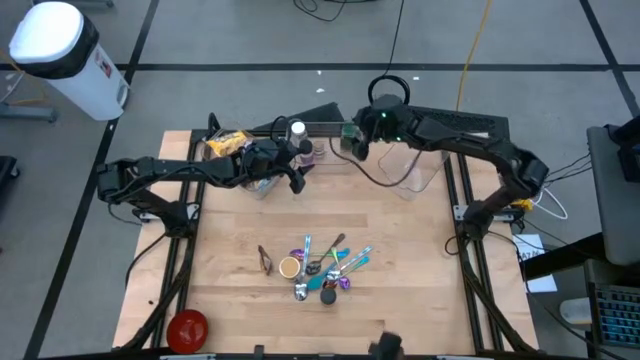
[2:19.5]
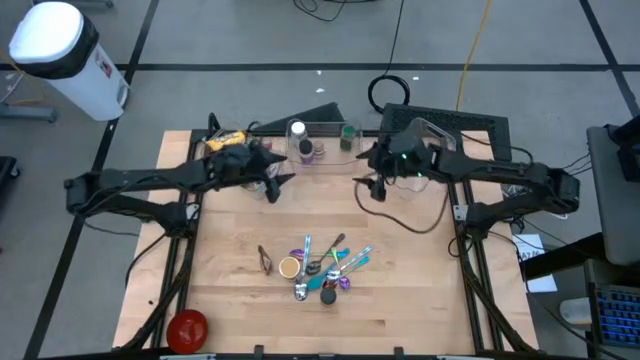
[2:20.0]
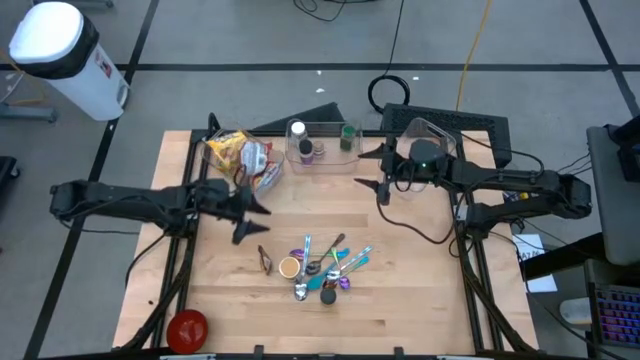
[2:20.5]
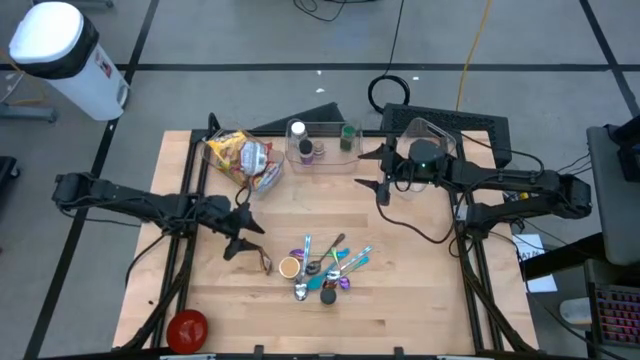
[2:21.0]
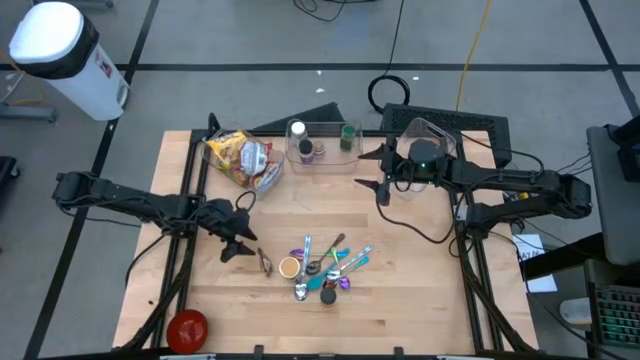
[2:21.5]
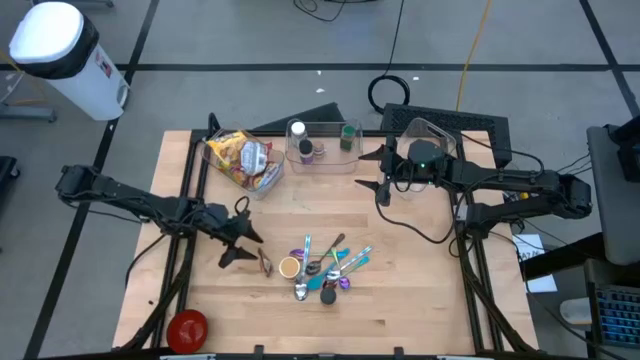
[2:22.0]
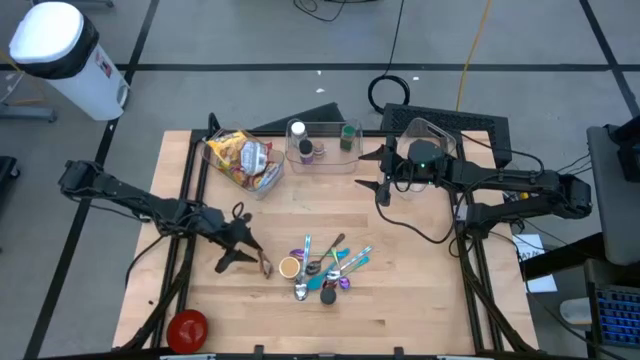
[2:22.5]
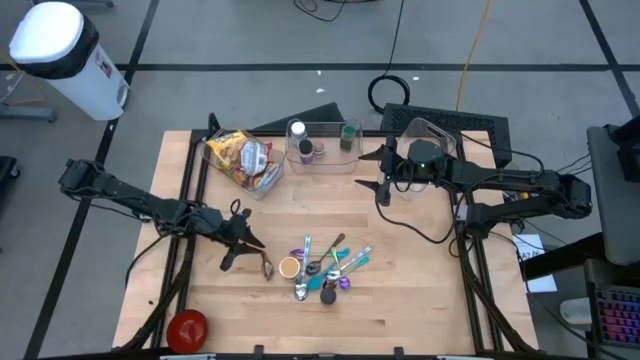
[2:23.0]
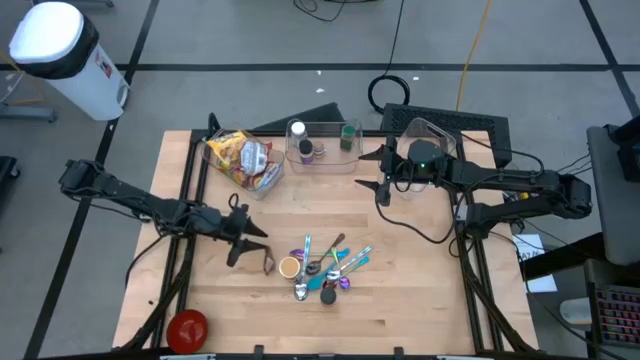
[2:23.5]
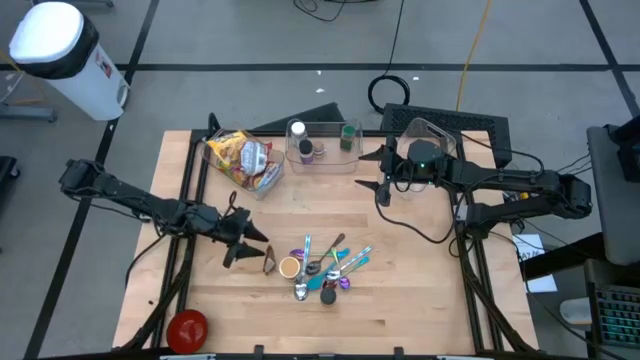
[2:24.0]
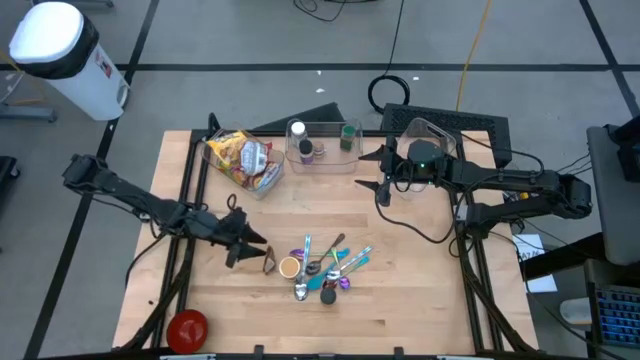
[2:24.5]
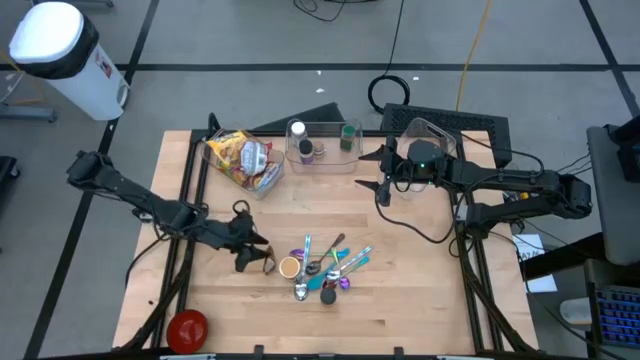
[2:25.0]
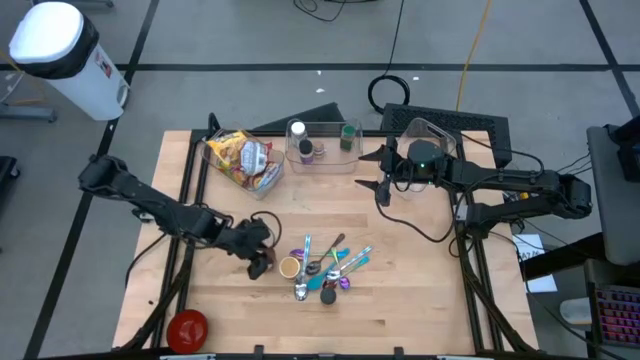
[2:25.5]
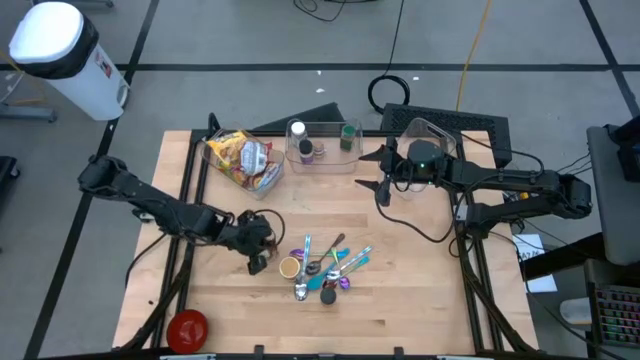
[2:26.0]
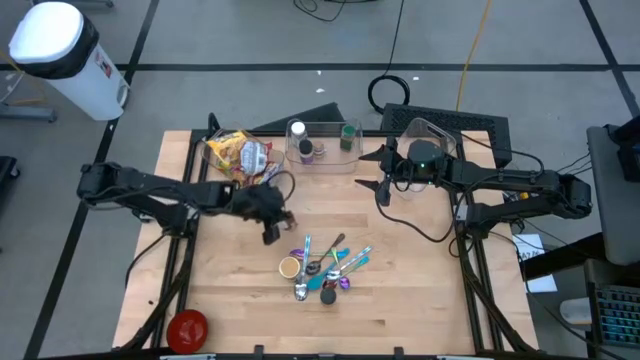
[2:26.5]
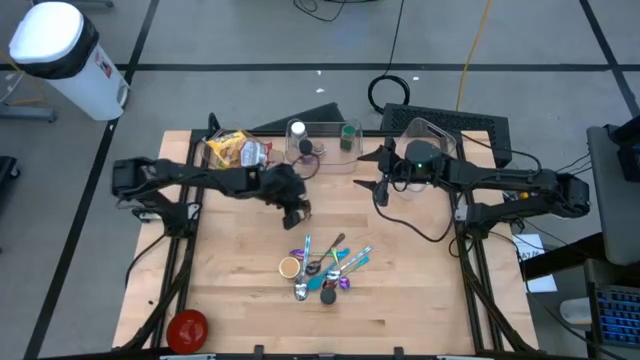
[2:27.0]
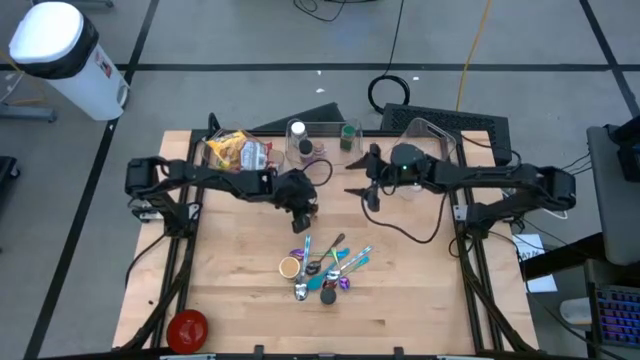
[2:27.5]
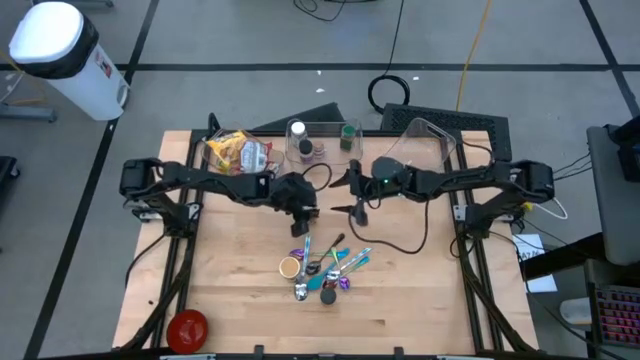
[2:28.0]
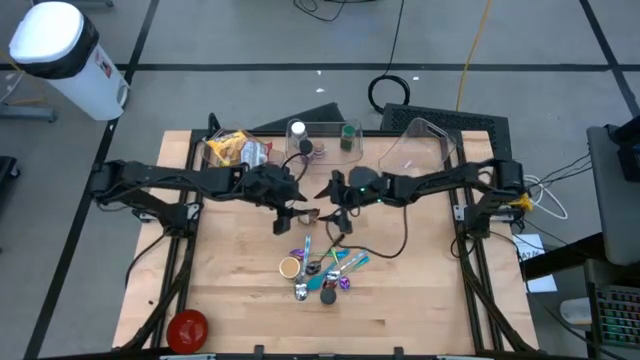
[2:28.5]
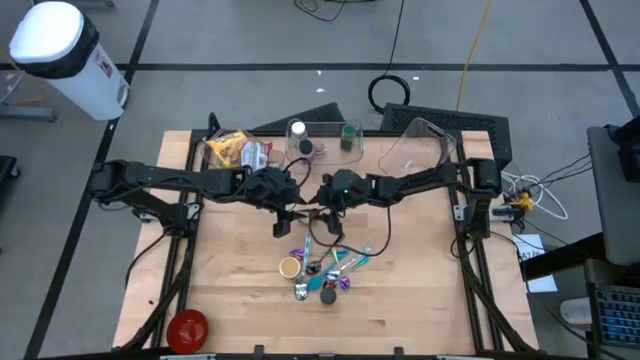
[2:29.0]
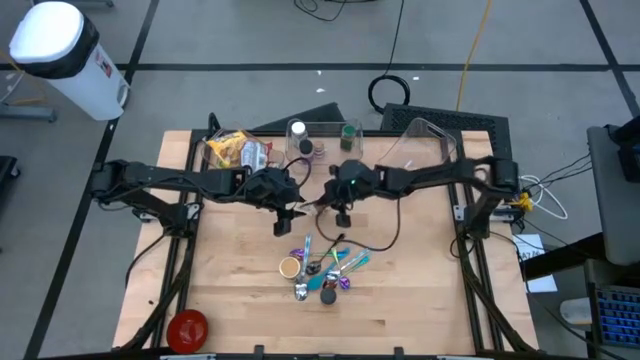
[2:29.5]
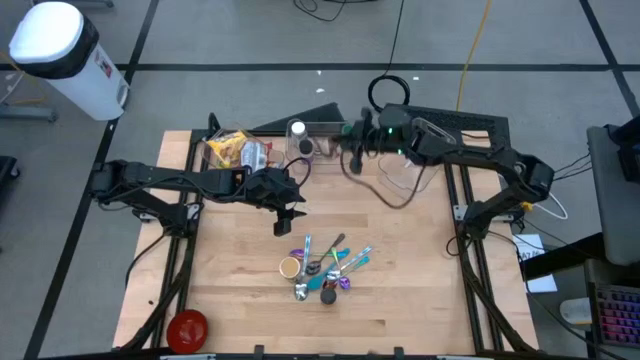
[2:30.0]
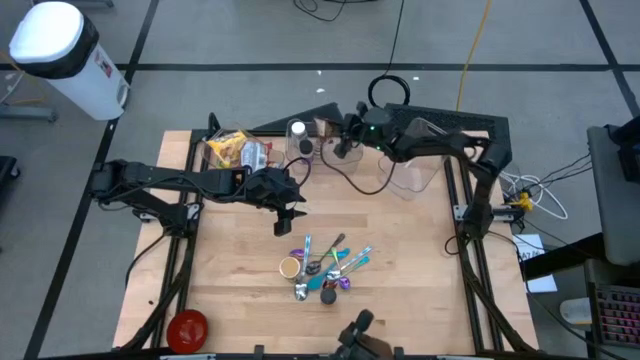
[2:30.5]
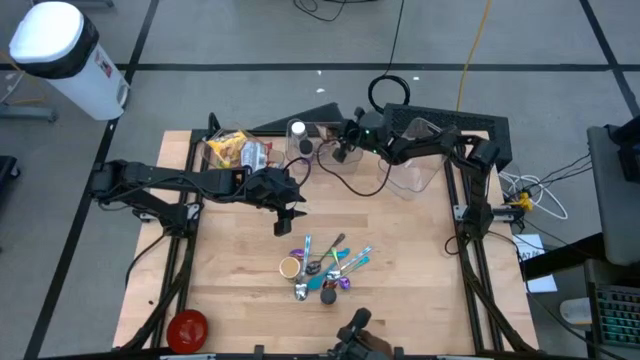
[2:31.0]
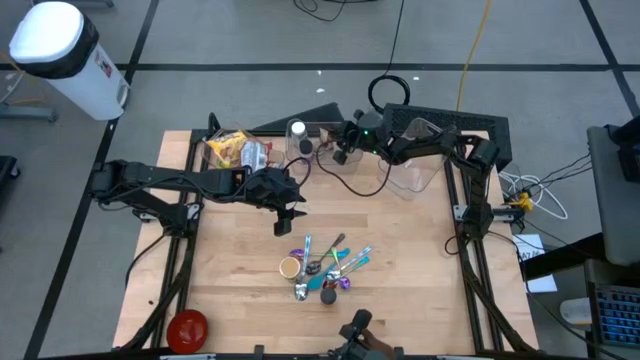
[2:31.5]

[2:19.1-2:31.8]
Task: Pick & Place Food Item
Put the brown orange seasoning pack into the middle transparent bin

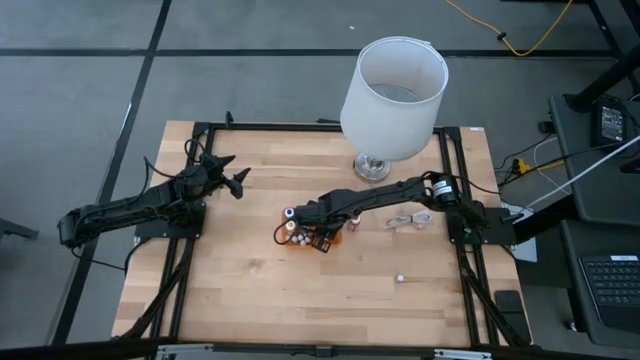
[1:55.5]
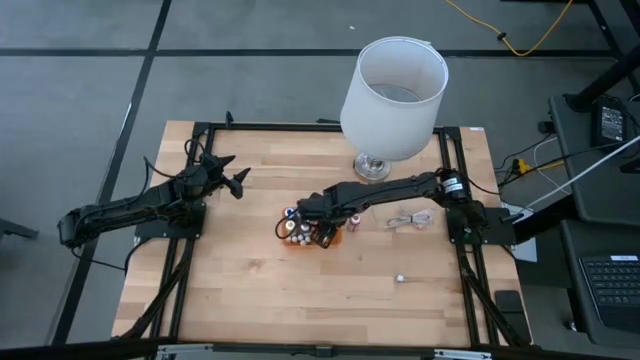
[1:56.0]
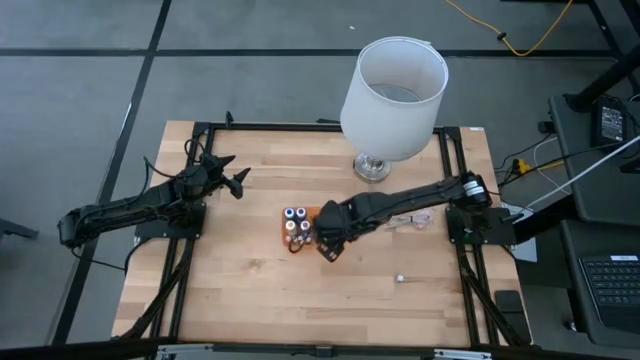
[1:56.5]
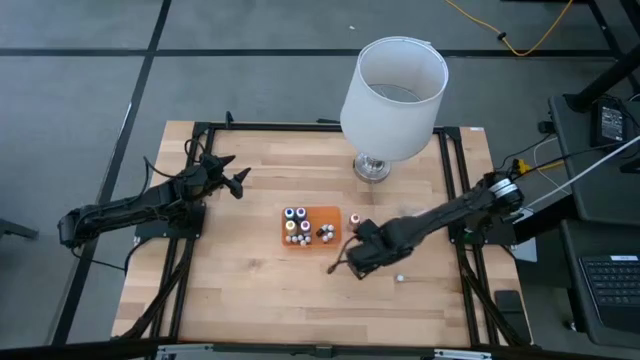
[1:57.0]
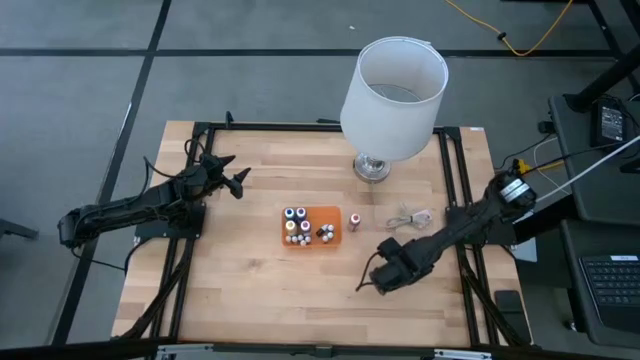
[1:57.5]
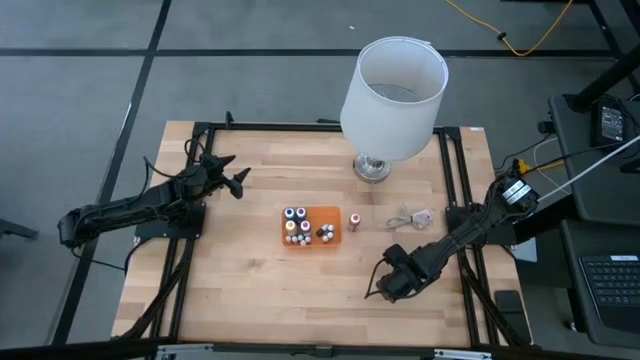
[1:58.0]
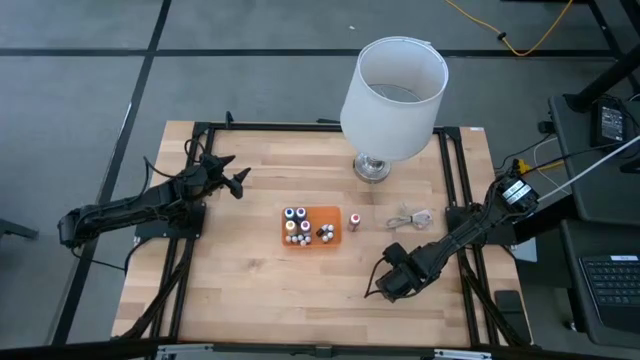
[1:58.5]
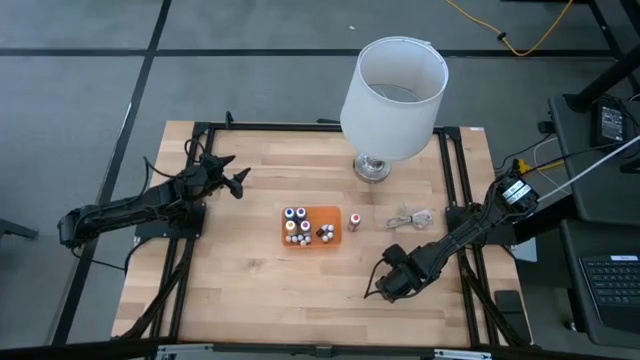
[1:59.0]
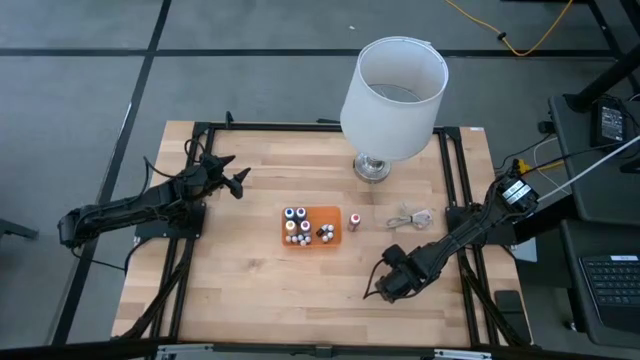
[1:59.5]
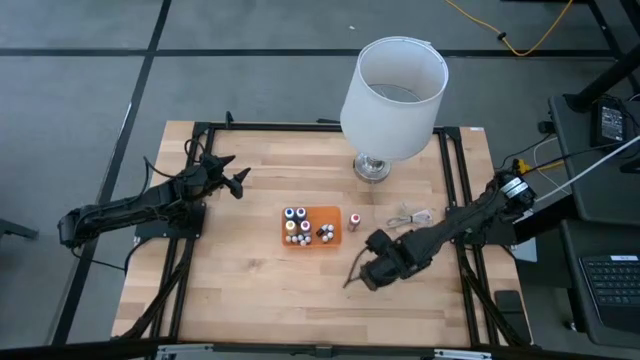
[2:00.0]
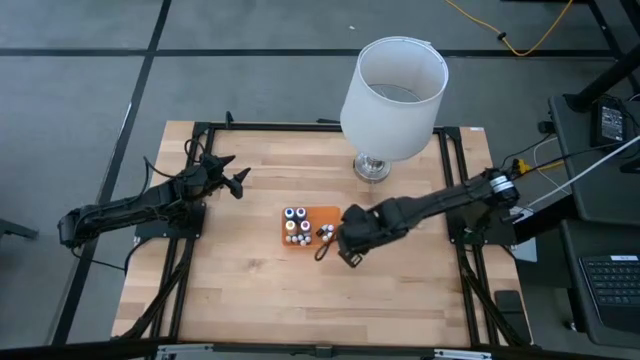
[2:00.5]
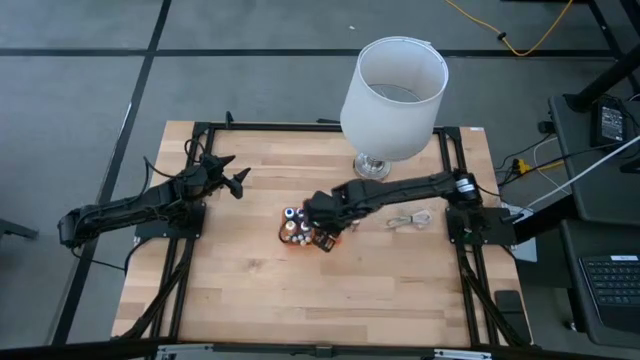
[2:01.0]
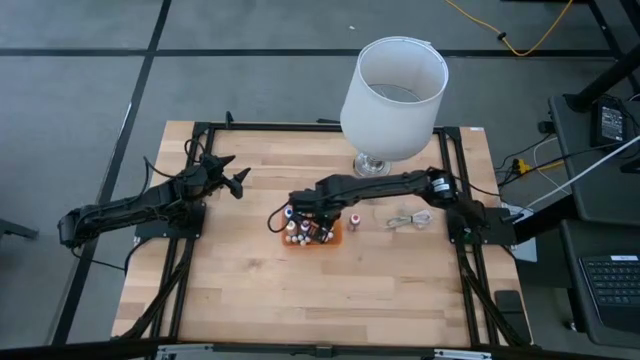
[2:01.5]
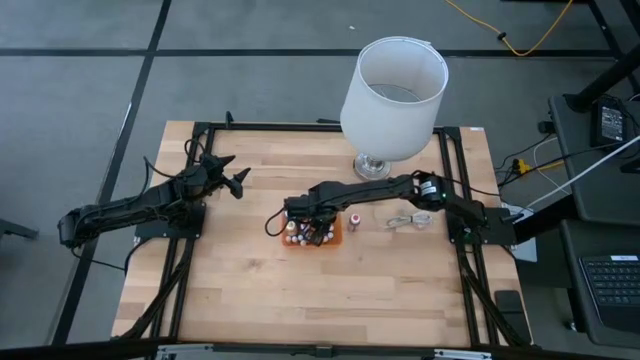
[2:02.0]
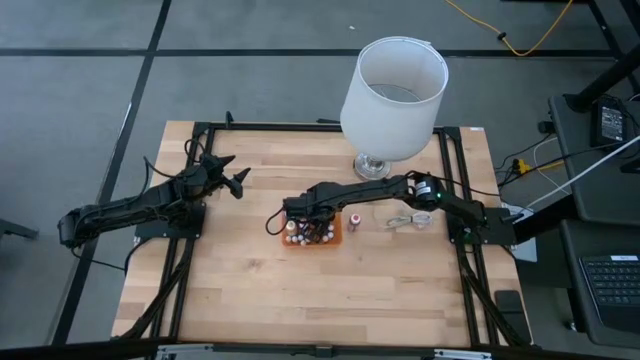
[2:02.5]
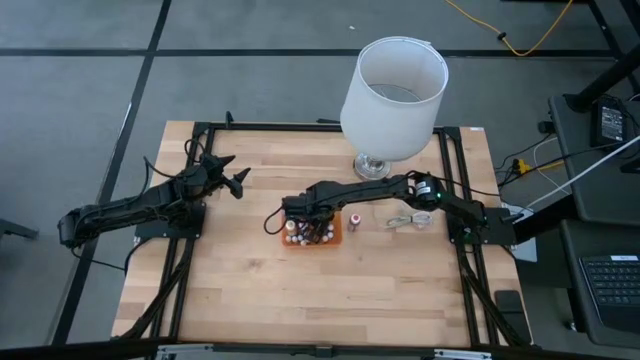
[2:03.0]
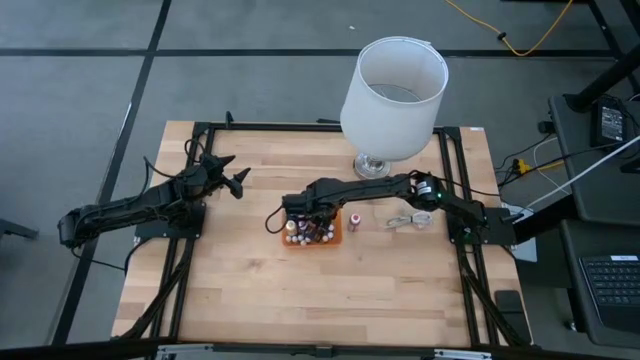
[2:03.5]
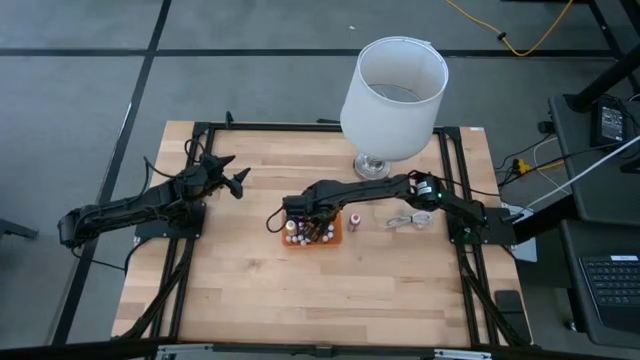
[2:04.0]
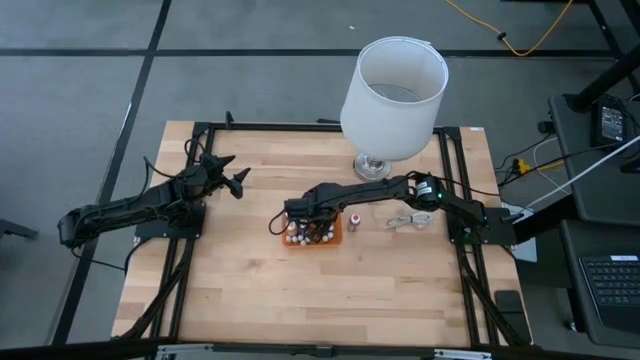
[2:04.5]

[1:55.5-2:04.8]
Task: Pick & Place food coloring
Put the small purple food coloring bottle into the orange bin
